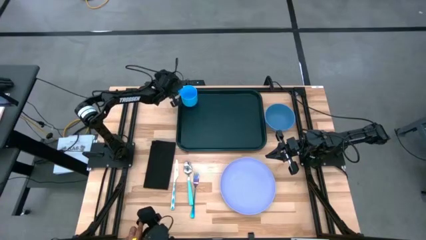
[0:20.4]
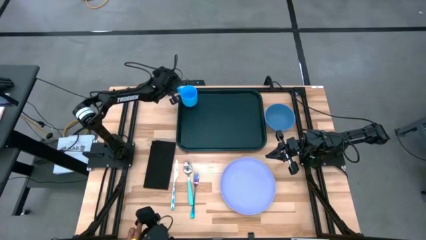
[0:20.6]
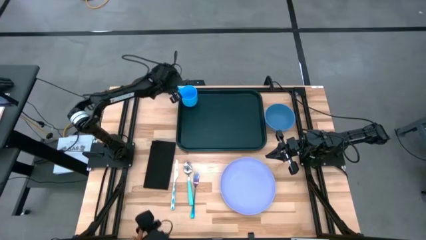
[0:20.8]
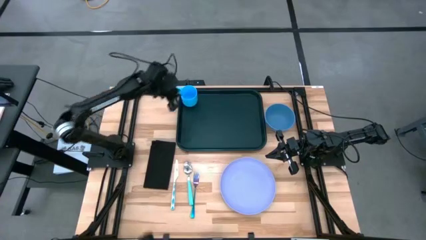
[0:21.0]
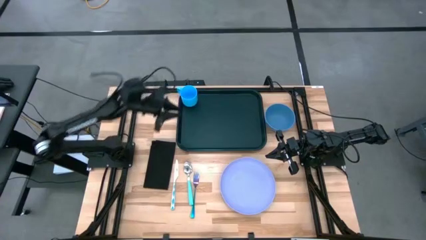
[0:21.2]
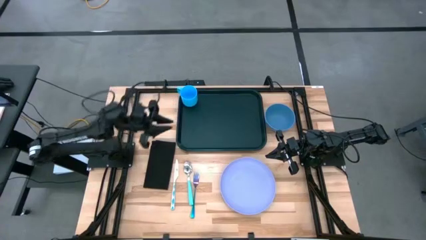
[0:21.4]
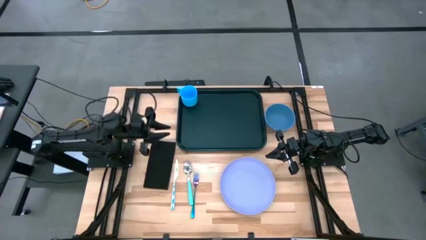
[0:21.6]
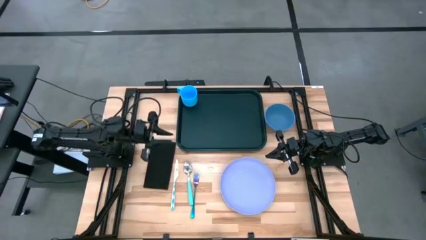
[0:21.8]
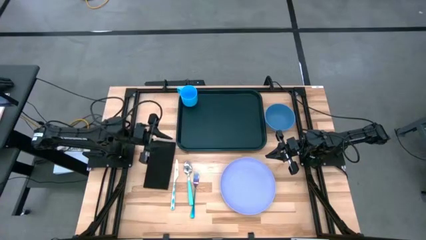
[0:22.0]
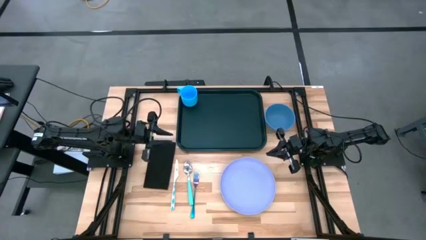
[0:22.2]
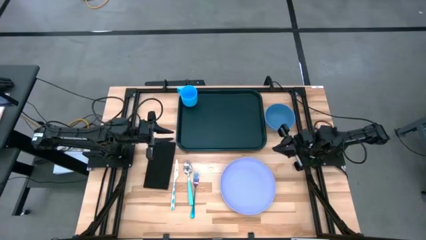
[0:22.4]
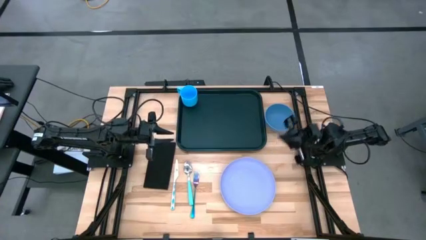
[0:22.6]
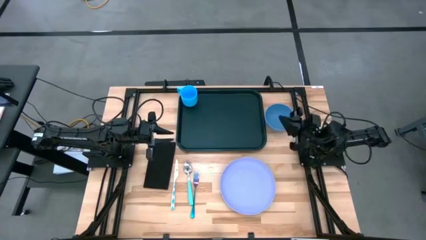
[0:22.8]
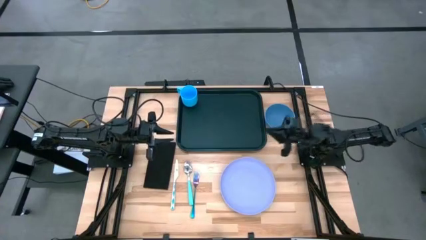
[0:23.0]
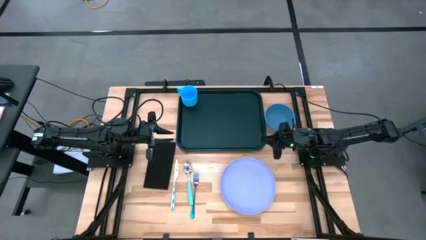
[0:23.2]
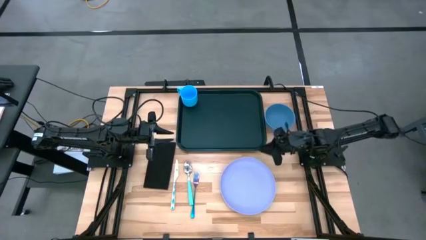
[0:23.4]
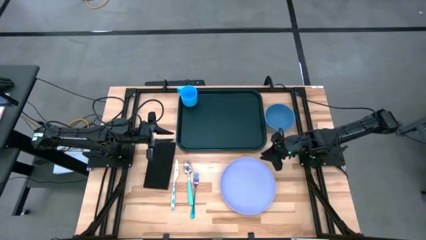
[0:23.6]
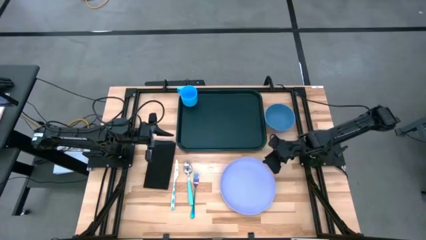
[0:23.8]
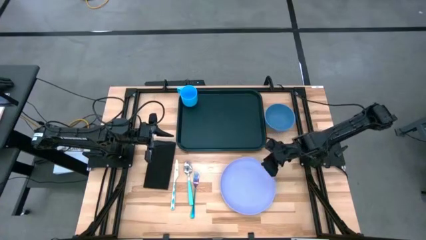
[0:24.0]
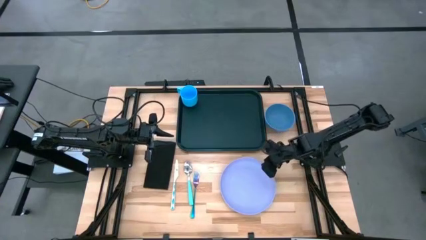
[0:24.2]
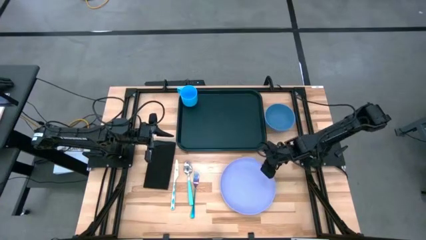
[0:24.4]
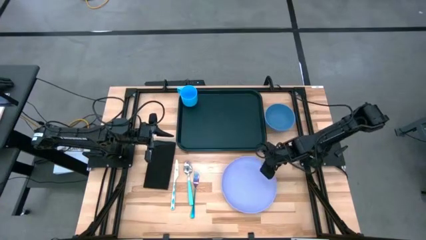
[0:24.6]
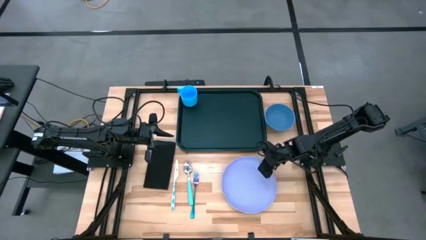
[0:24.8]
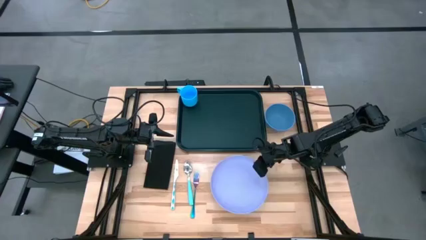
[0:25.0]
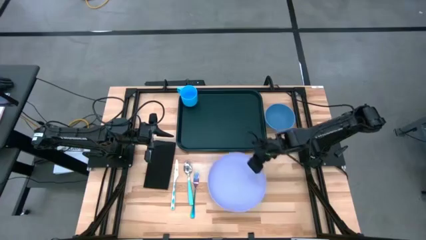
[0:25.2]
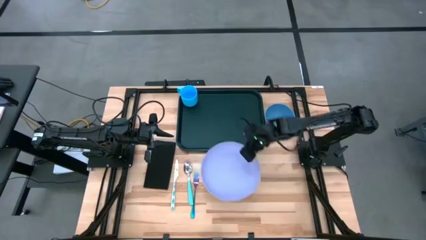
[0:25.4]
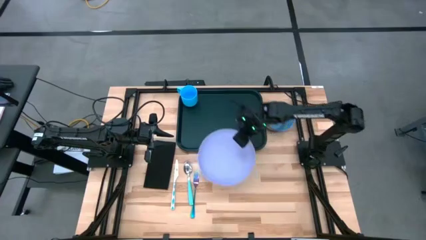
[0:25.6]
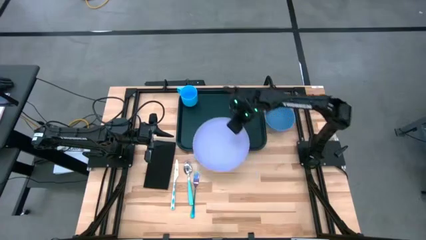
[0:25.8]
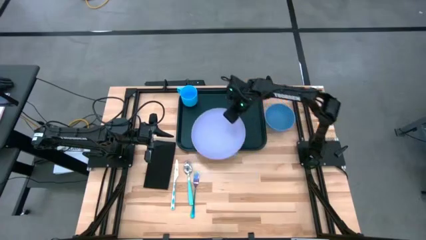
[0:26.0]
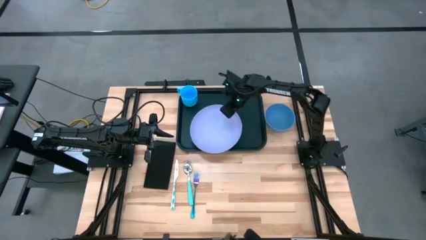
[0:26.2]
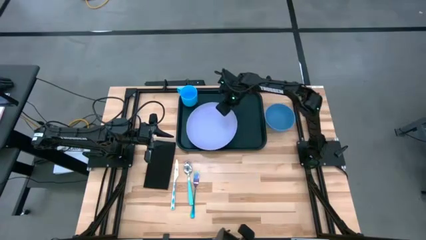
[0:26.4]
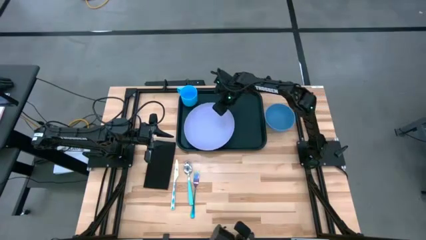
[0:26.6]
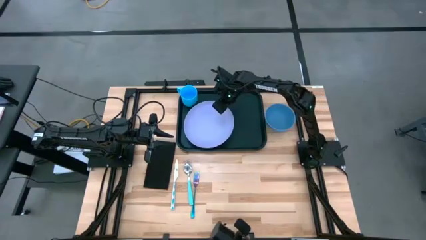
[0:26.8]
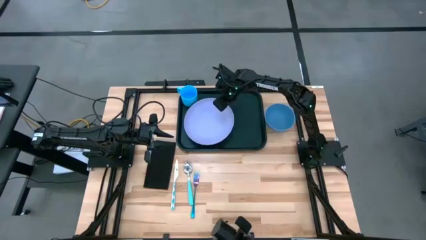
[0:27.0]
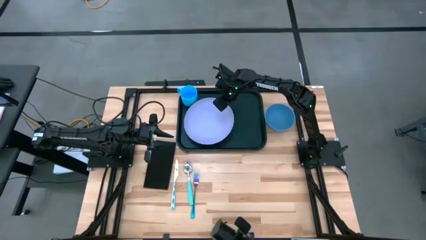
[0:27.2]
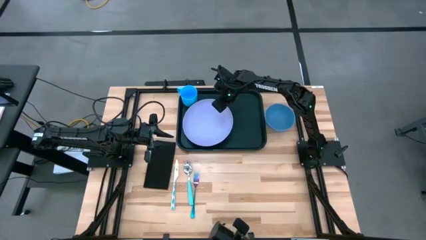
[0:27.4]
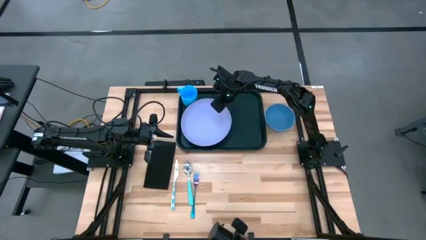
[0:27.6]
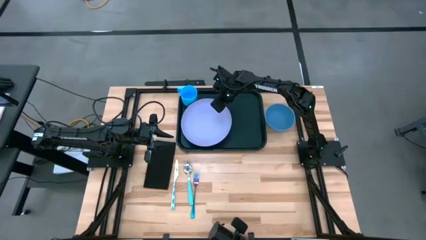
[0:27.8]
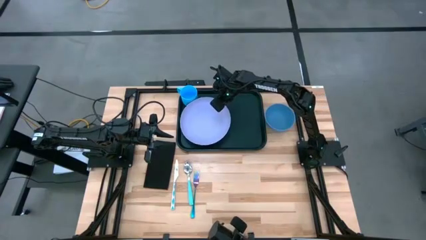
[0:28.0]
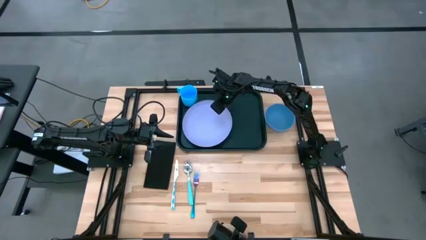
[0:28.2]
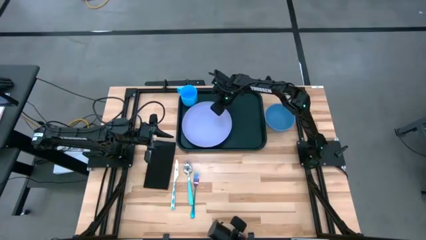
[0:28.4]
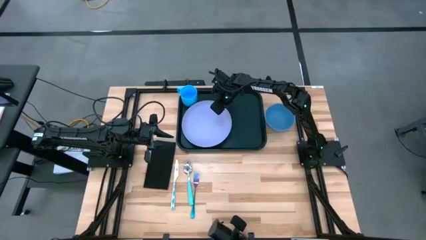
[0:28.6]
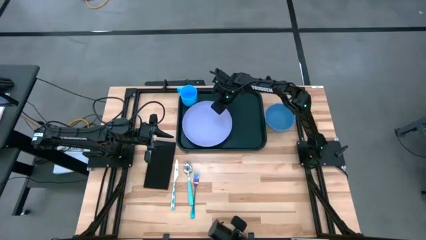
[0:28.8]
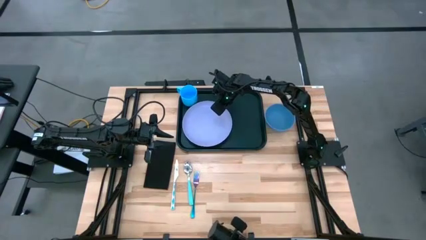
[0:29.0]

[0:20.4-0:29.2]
Task: Set up tray
Put the purple plate below the blue mug on the black tray

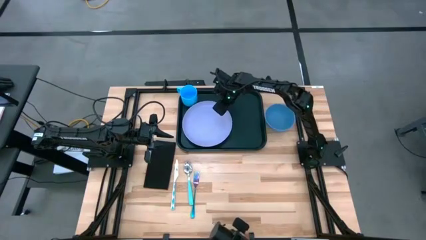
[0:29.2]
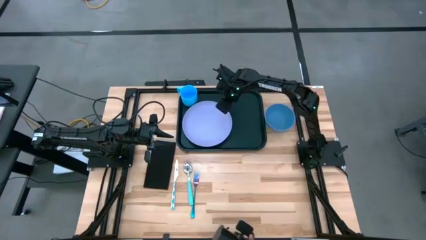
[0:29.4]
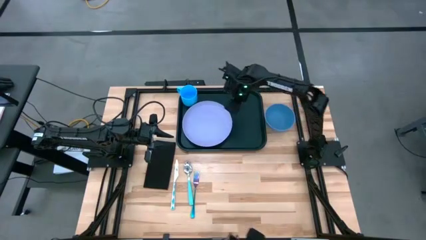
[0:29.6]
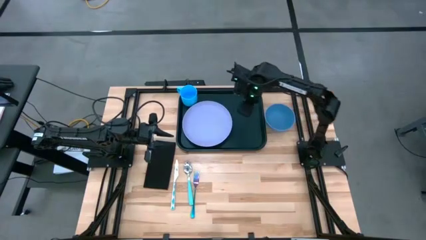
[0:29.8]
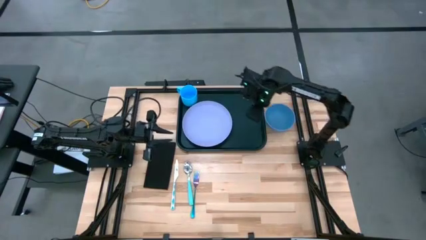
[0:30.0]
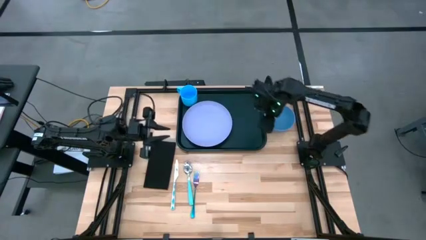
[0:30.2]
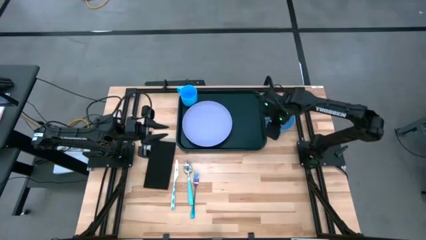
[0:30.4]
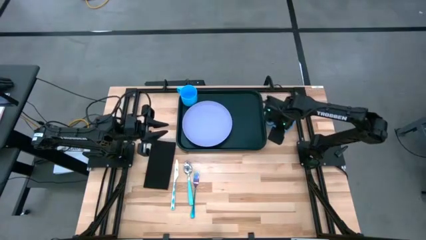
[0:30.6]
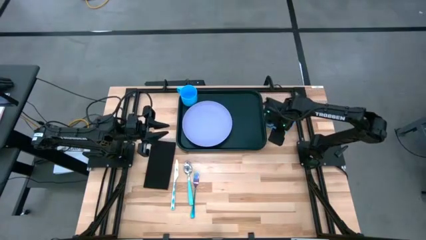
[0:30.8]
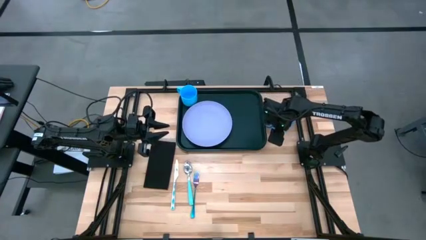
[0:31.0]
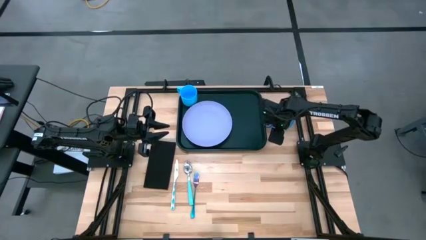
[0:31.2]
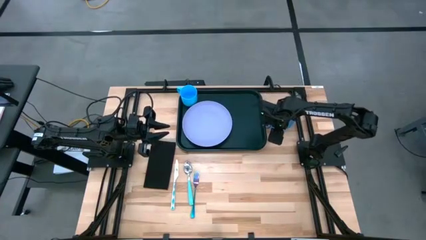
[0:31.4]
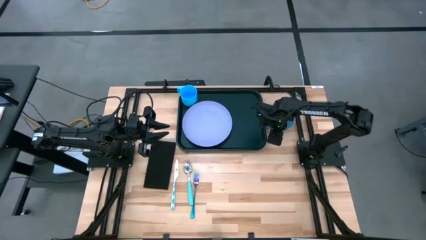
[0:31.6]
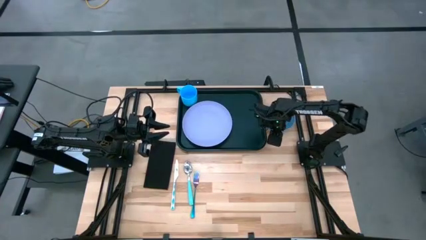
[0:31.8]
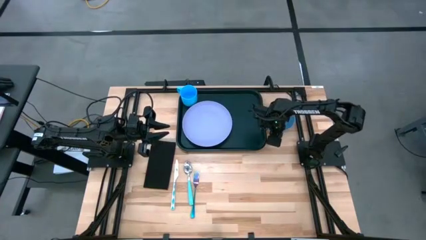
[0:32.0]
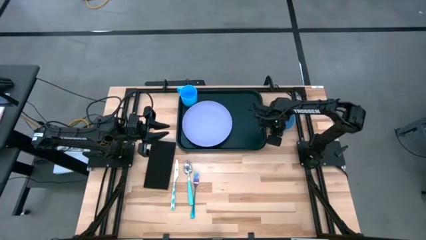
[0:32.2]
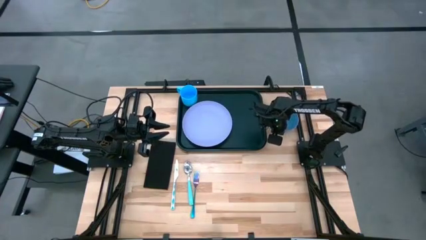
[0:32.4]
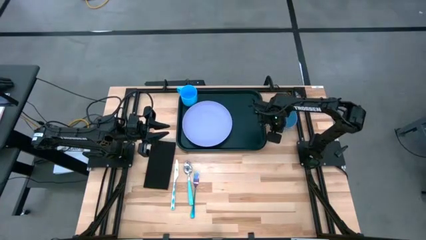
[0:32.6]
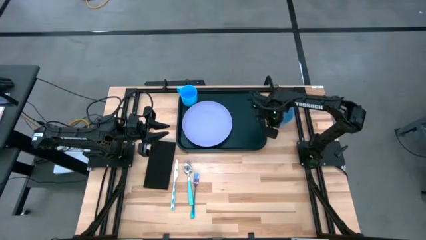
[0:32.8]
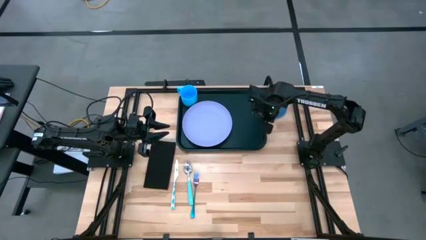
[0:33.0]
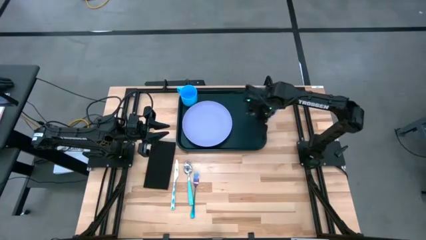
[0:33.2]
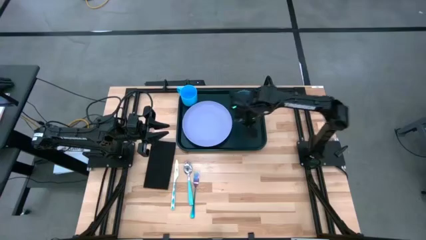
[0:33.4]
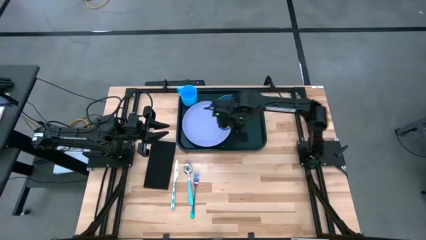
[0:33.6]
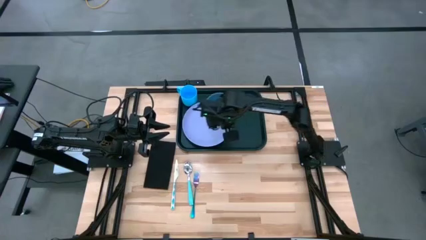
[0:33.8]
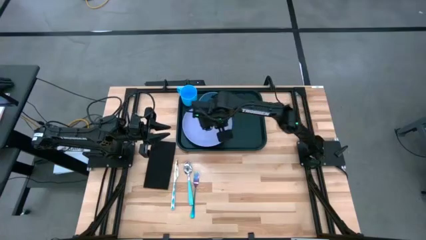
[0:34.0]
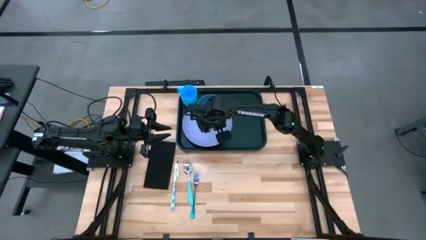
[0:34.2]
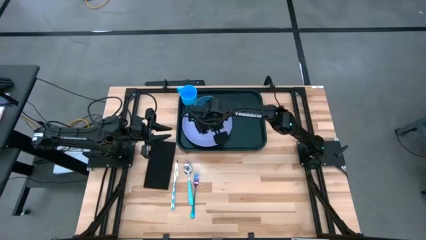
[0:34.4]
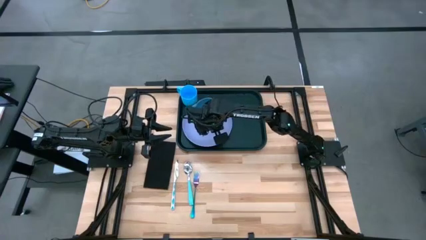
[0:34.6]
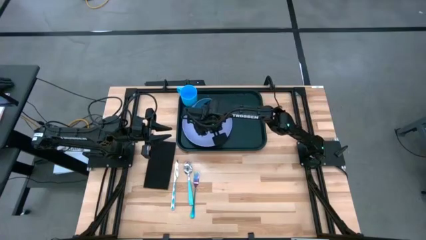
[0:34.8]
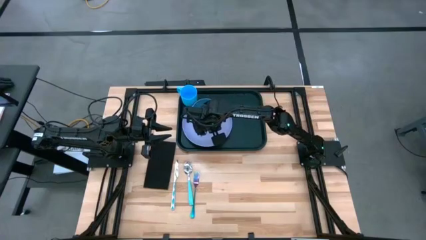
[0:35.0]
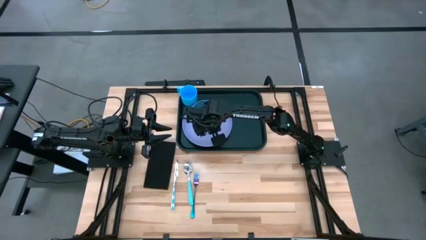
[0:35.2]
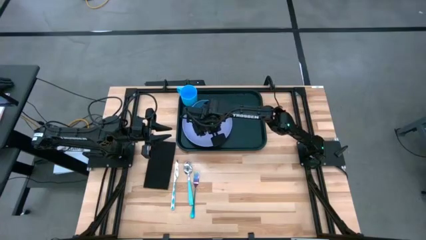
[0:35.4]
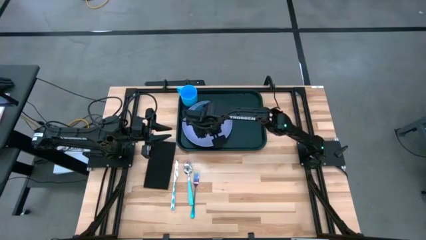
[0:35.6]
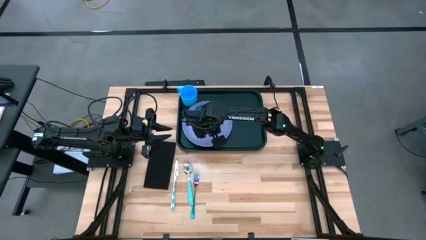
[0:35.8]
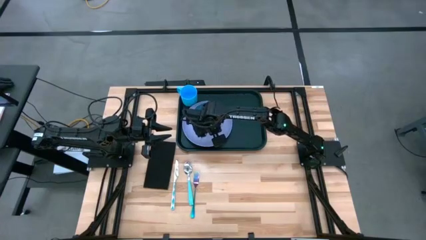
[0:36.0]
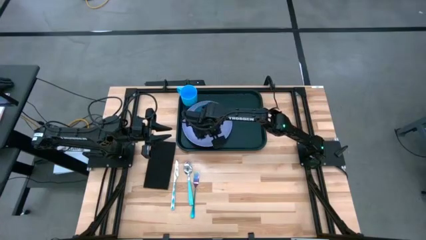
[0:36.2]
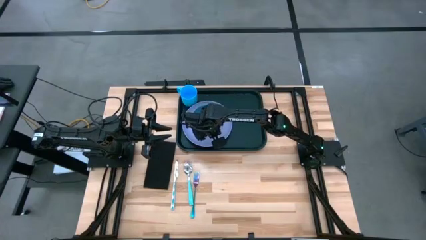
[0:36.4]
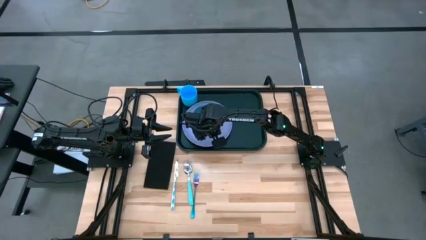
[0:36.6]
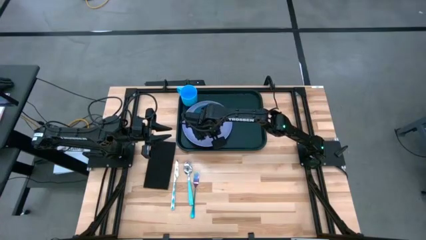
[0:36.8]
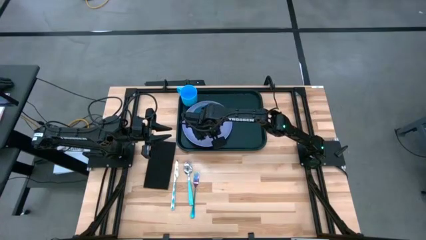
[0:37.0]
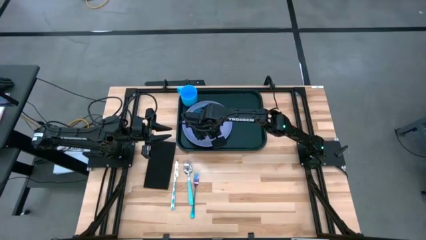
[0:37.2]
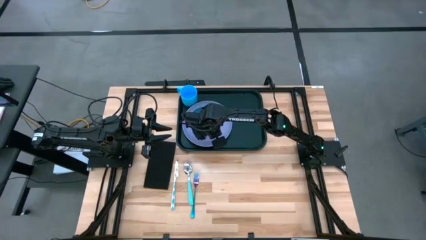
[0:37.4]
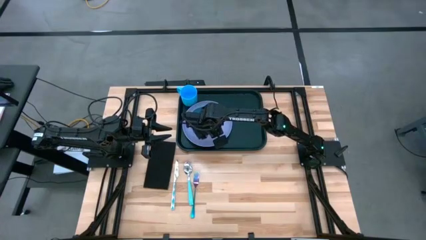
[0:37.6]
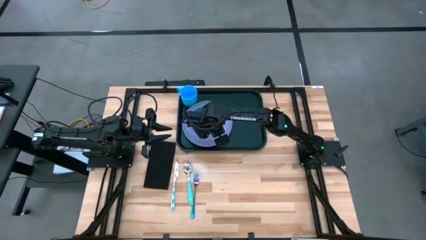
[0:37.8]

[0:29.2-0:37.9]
Put the blue bowl on top of the purple plate on the black tray
